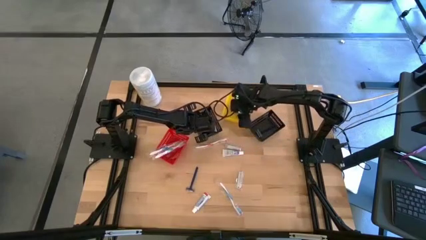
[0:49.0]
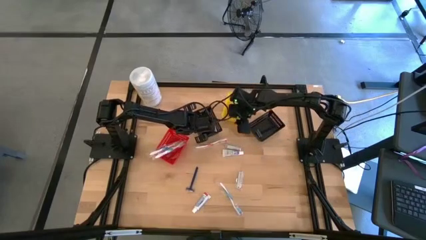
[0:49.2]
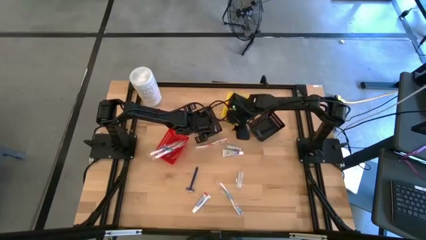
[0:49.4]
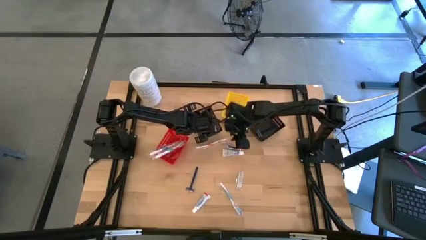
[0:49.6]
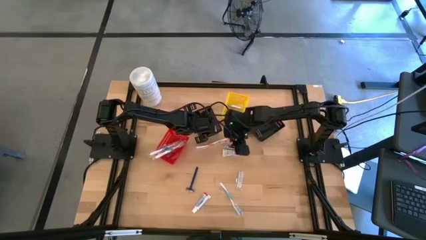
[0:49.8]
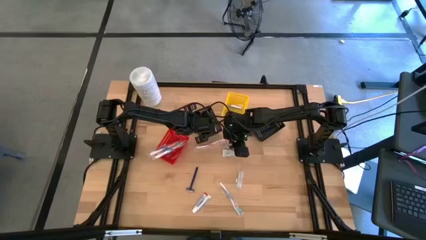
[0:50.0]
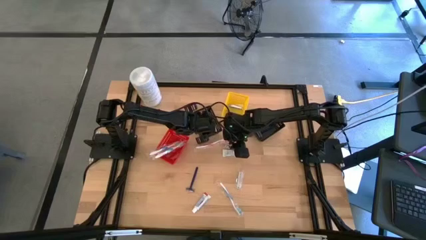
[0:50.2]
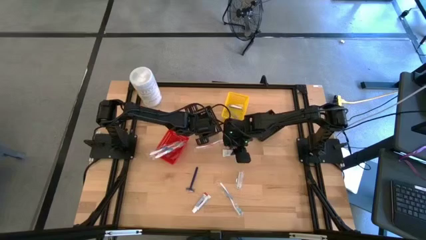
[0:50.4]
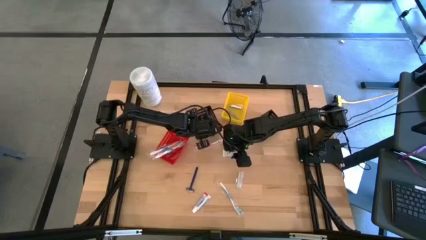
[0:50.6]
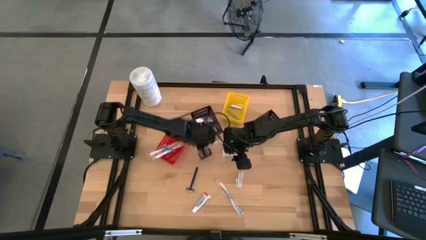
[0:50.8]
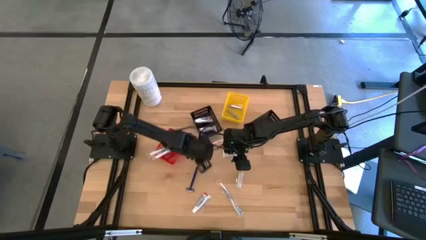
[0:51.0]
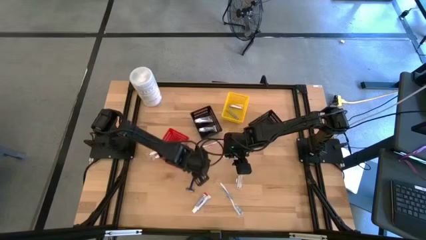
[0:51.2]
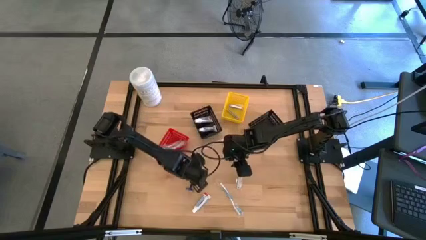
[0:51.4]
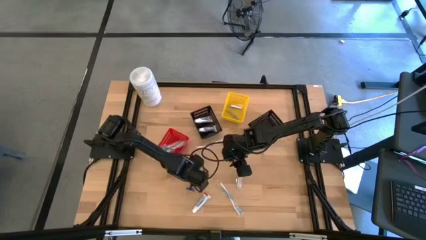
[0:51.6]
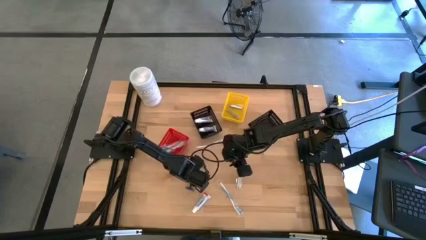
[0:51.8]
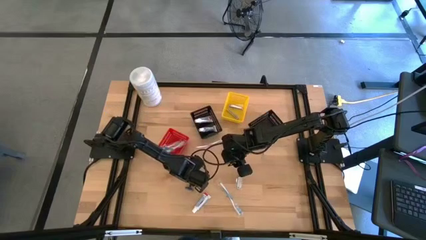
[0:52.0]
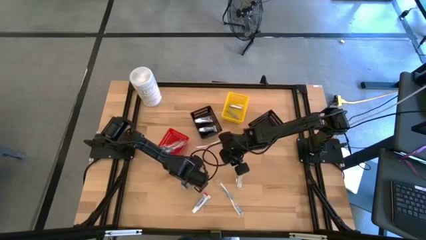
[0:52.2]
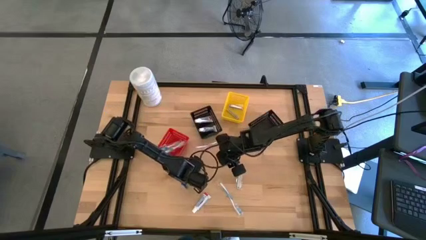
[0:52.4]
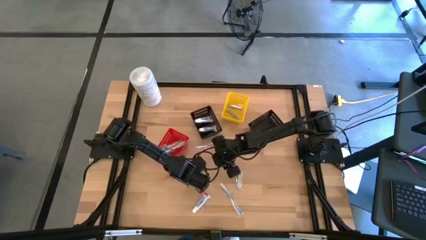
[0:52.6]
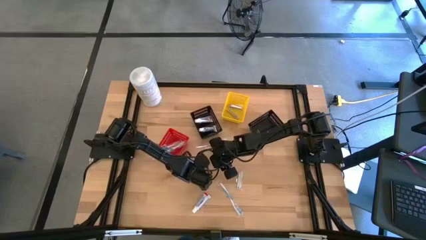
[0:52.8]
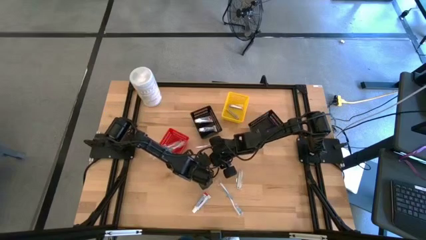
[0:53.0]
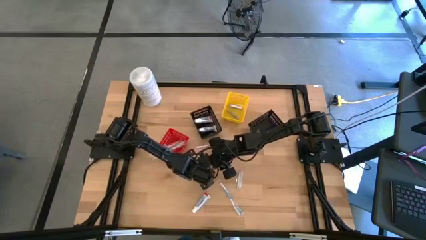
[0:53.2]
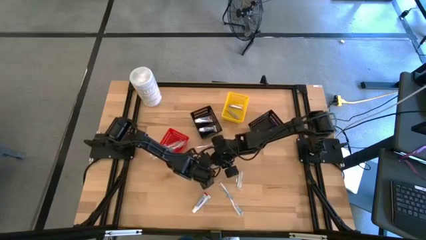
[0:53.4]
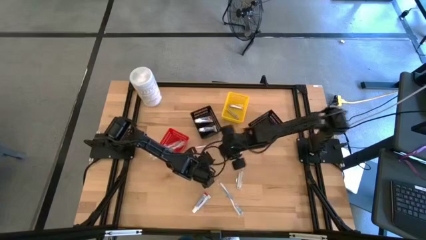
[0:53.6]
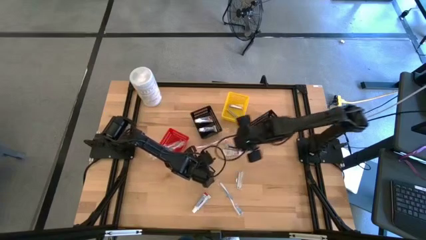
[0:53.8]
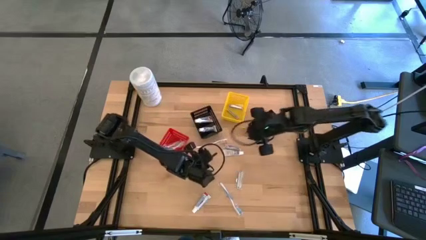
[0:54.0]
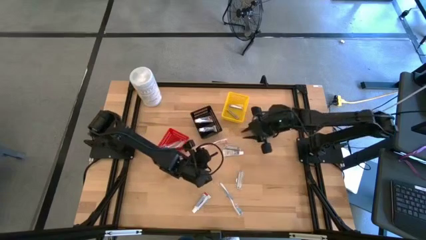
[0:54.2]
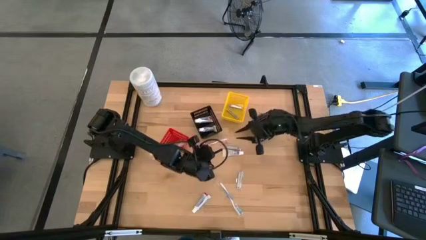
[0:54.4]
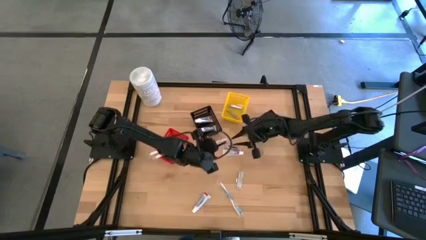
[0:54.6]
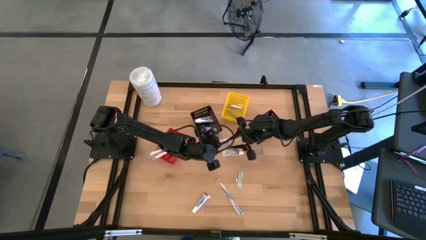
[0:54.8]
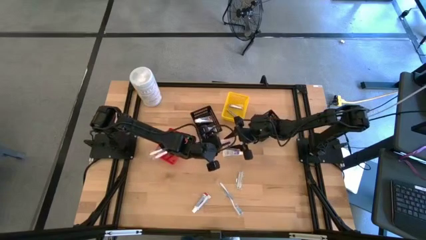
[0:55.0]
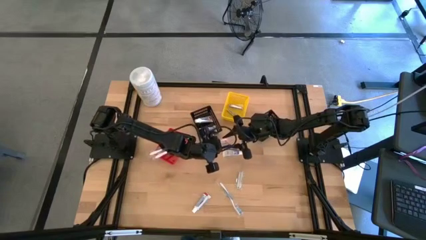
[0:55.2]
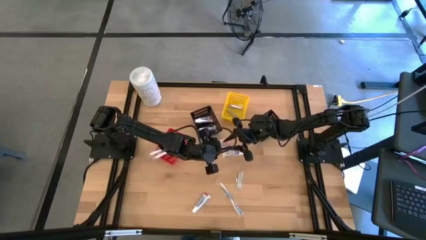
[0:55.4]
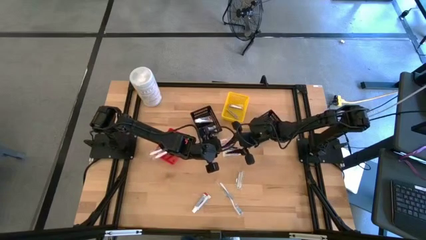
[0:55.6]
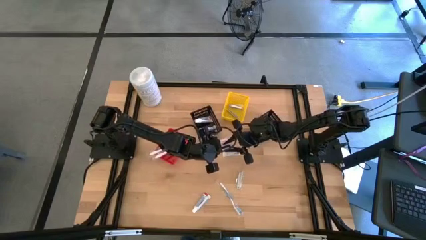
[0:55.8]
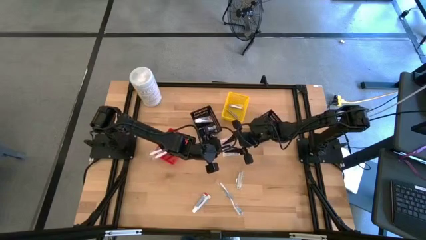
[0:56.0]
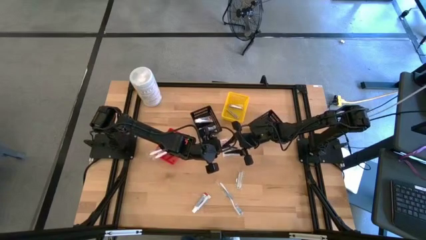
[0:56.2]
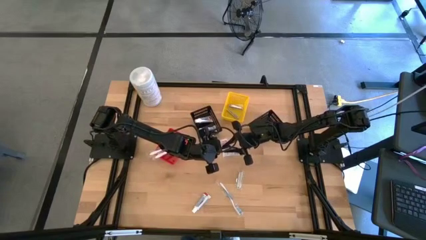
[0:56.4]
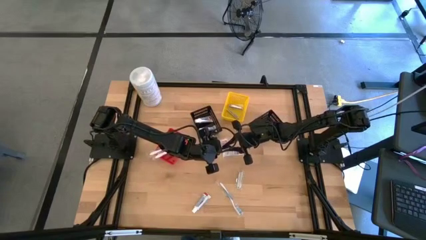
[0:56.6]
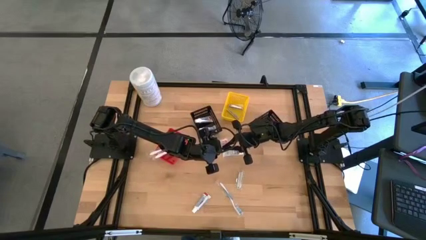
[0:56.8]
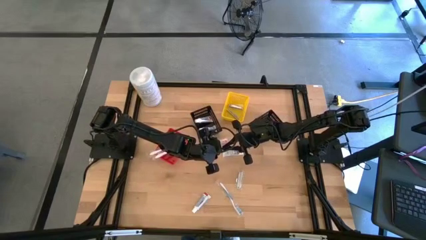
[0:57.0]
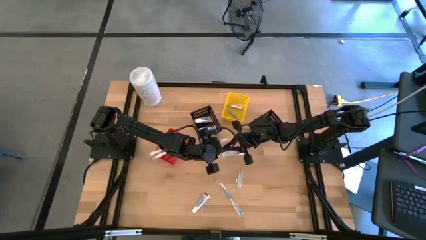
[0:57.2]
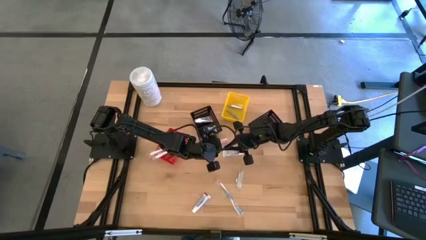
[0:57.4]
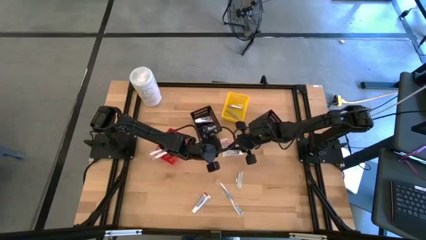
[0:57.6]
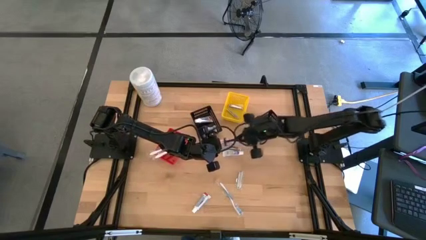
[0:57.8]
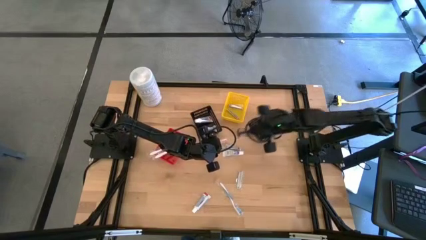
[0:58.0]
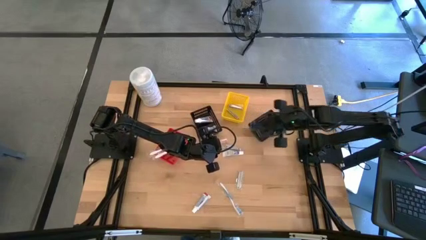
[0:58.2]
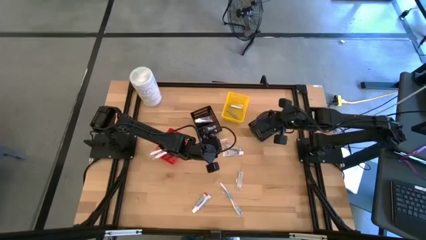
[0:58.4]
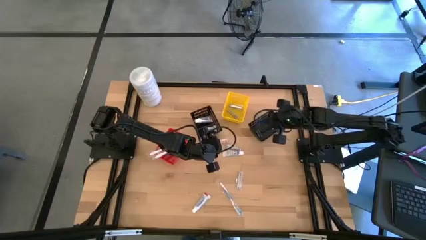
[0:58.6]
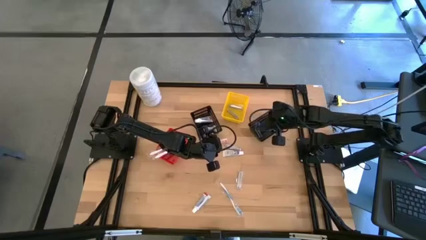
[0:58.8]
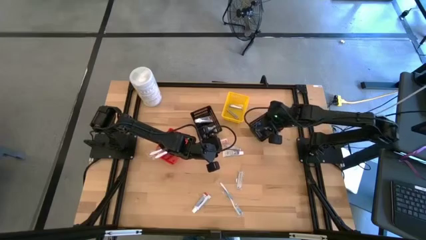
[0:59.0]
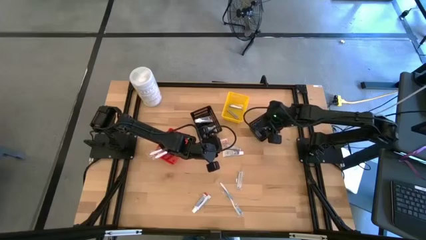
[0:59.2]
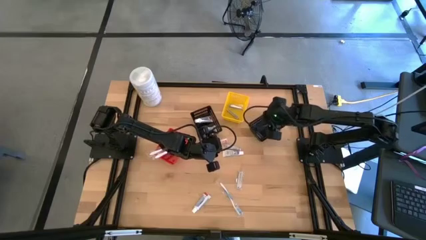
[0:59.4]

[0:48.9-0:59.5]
Task: Pick & Place Travel size toiletries
Put the razor into the right black bin

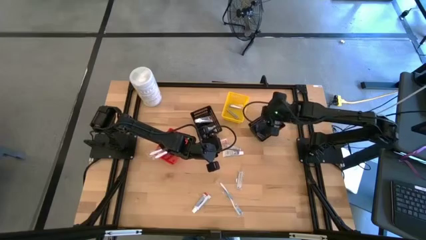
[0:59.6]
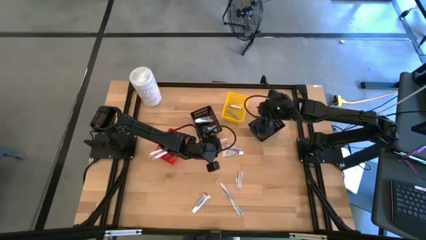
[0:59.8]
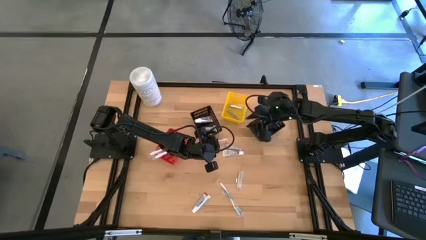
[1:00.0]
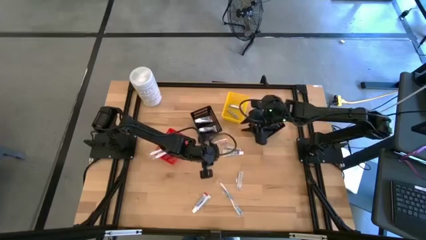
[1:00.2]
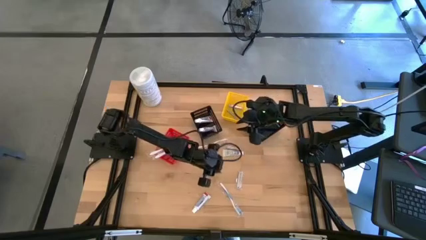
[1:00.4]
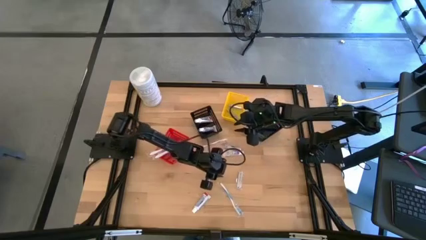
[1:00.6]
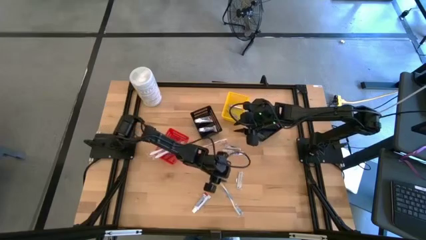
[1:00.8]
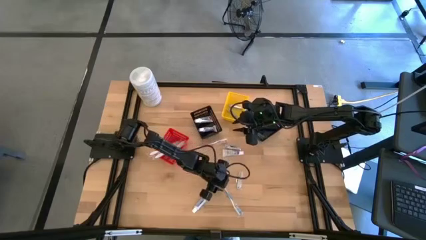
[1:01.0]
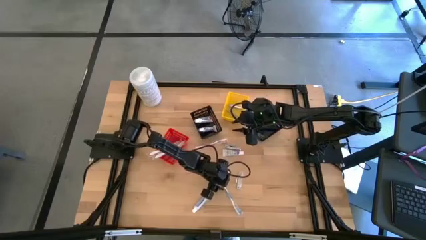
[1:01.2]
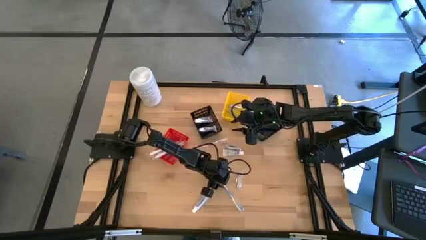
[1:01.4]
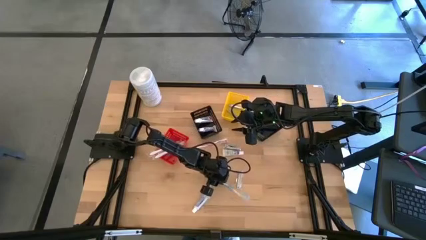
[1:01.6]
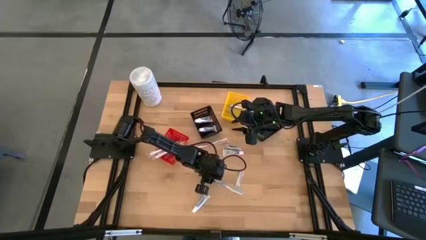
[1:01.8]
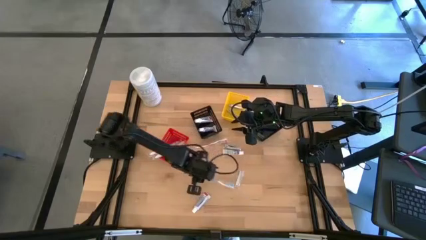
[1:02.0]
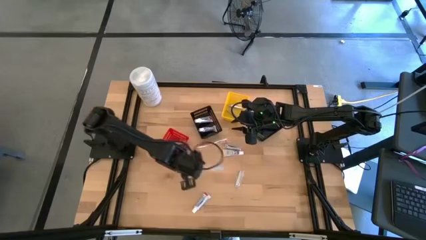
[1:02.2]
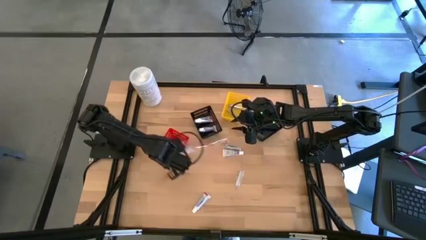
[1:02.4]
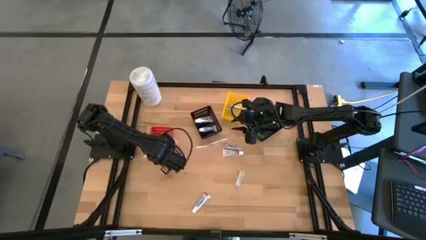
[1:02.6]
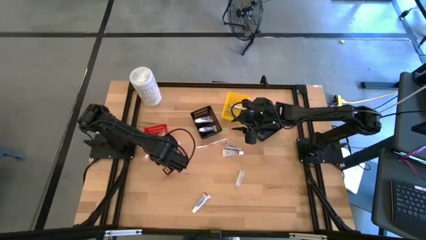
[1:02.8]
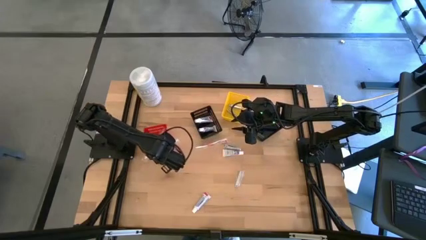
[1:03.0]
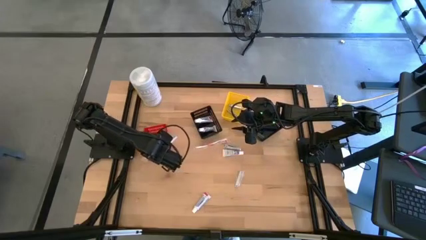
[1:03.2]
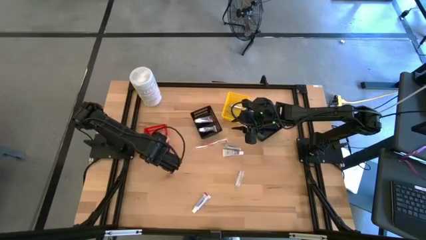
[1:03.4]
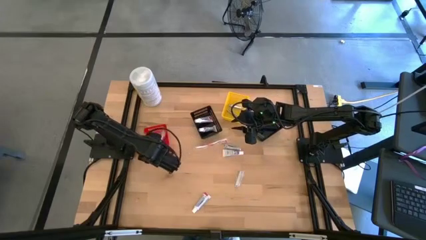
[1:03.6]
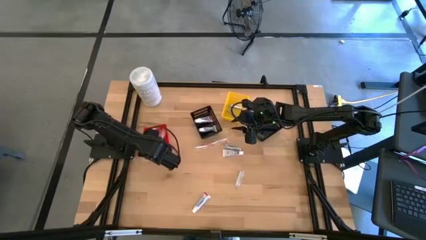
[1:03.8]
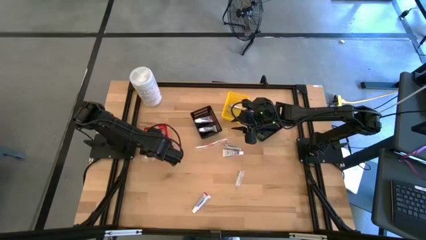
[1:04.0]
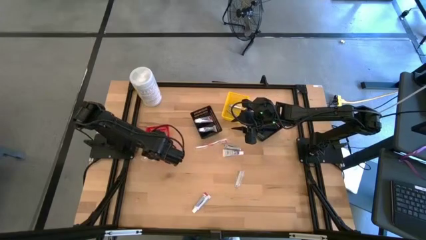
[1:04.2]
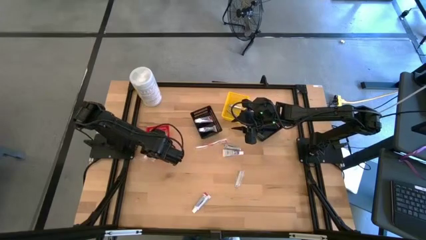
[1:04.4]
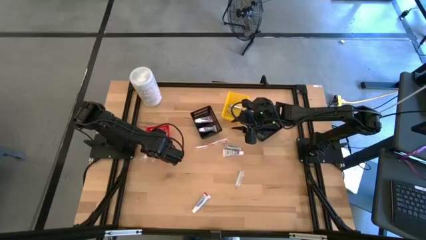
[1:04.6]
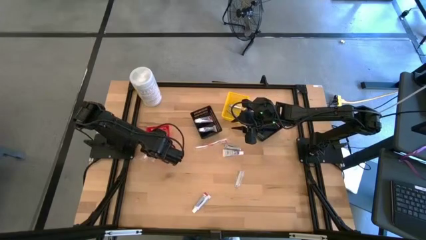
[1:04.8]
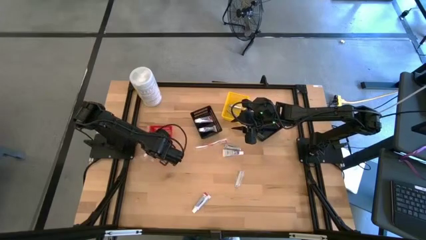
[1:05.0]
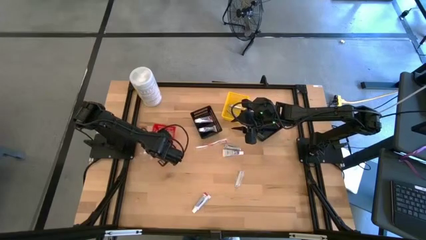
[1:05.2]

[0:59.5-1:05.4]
Put the blue toothbrush into the red bin
